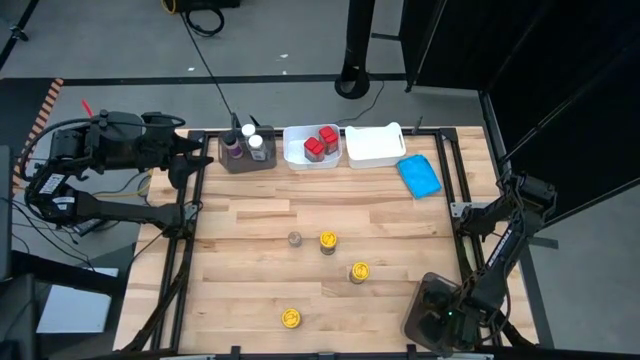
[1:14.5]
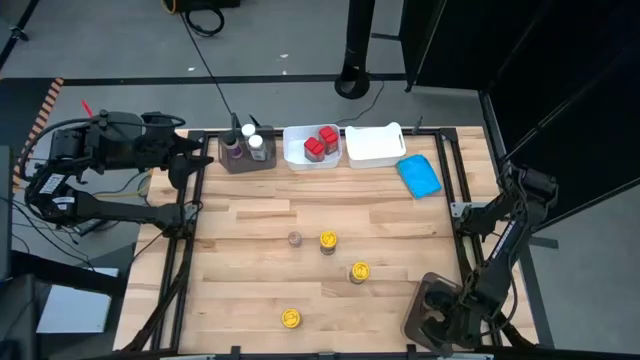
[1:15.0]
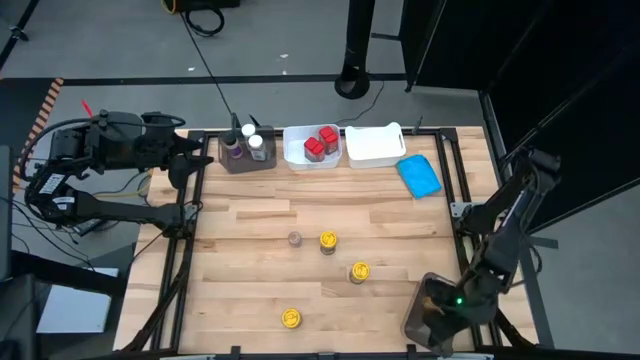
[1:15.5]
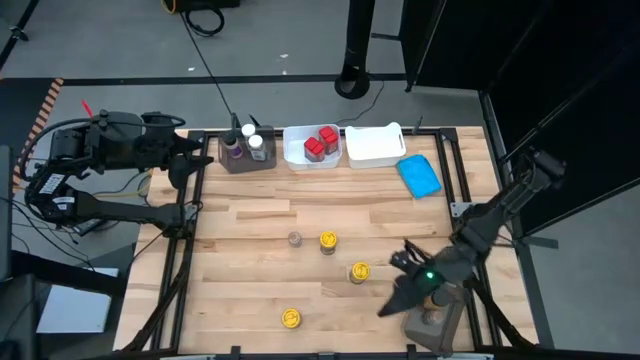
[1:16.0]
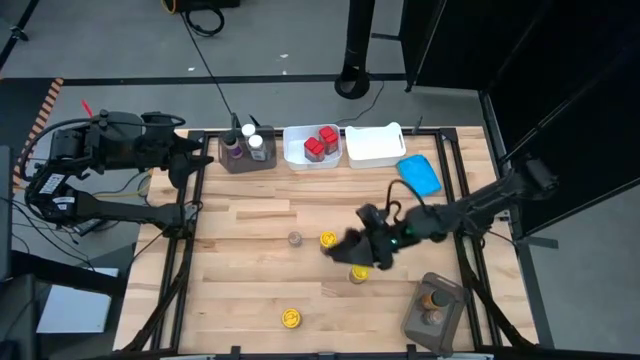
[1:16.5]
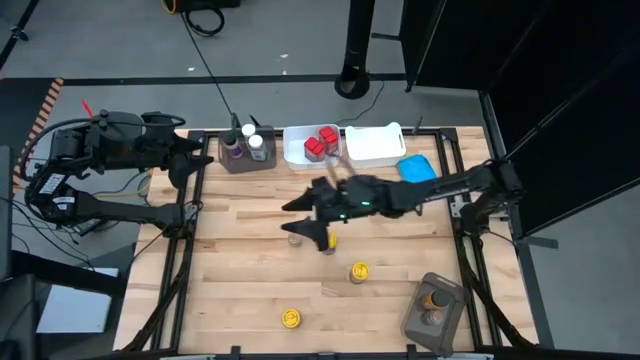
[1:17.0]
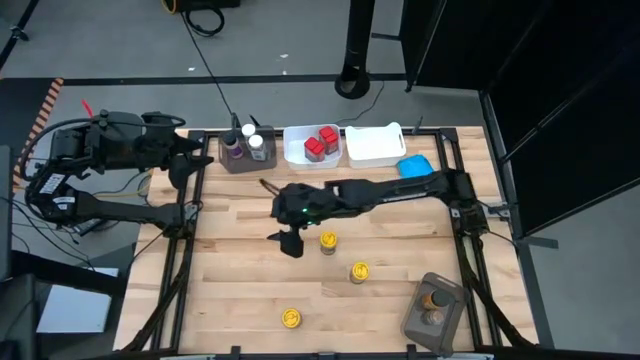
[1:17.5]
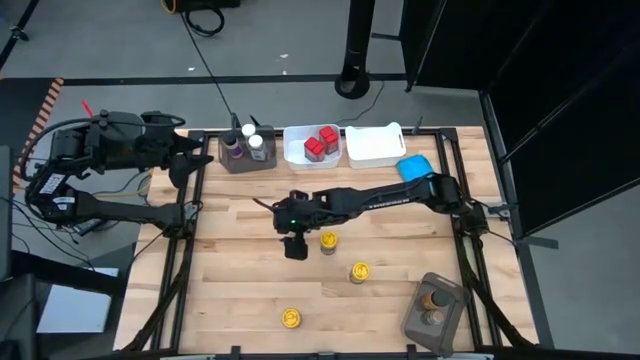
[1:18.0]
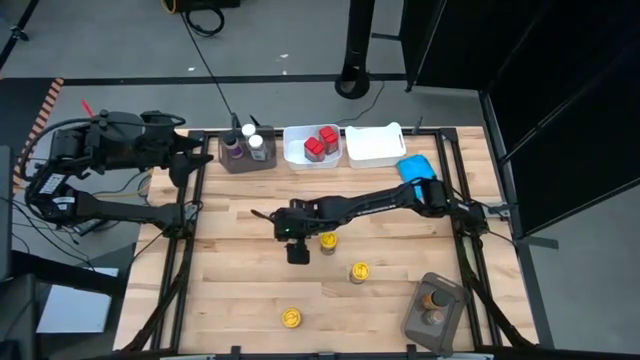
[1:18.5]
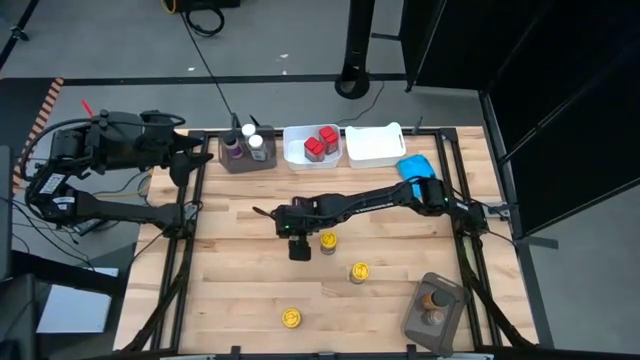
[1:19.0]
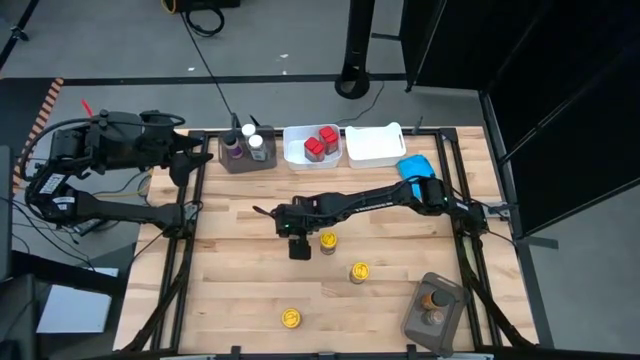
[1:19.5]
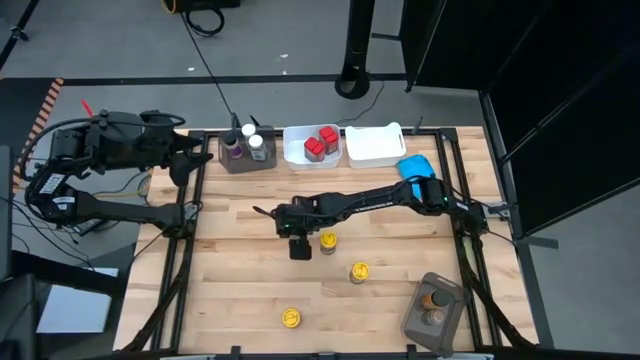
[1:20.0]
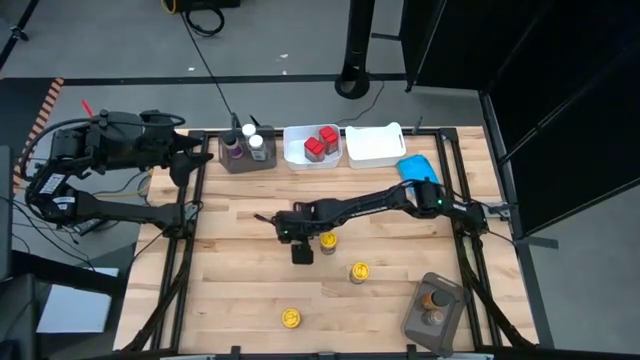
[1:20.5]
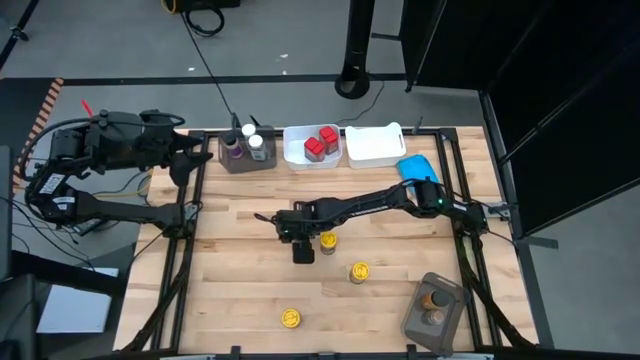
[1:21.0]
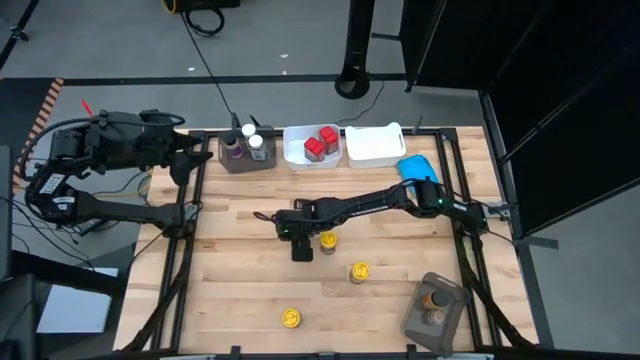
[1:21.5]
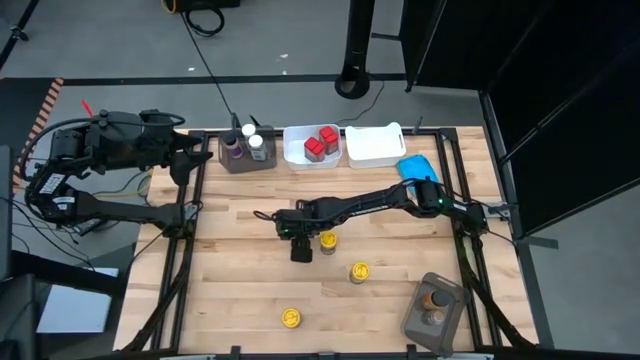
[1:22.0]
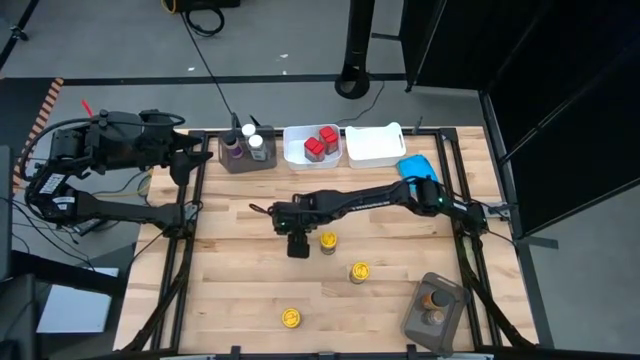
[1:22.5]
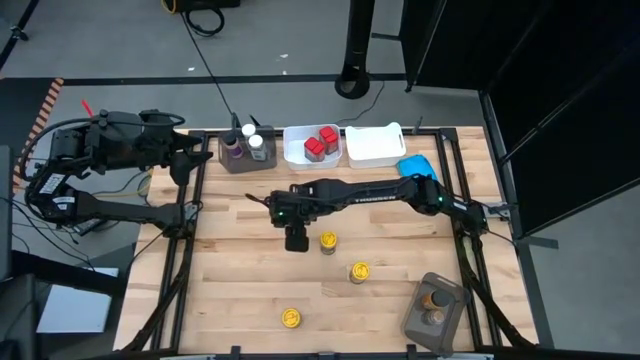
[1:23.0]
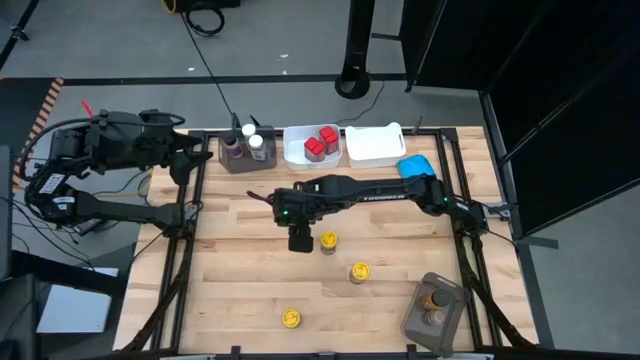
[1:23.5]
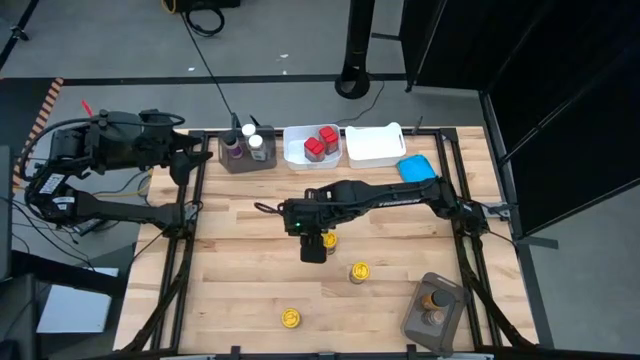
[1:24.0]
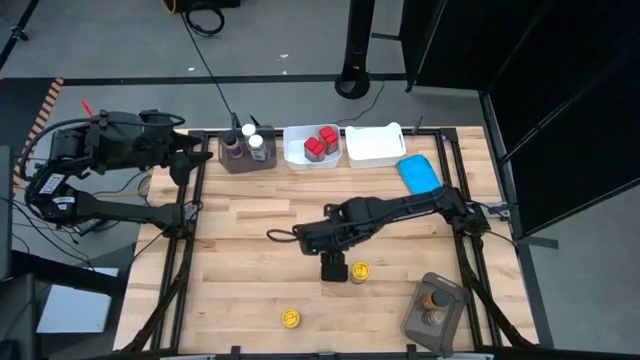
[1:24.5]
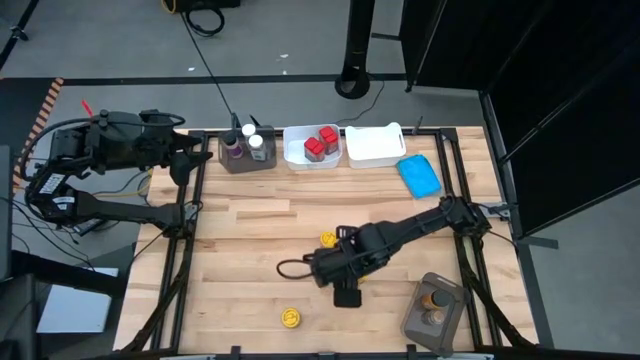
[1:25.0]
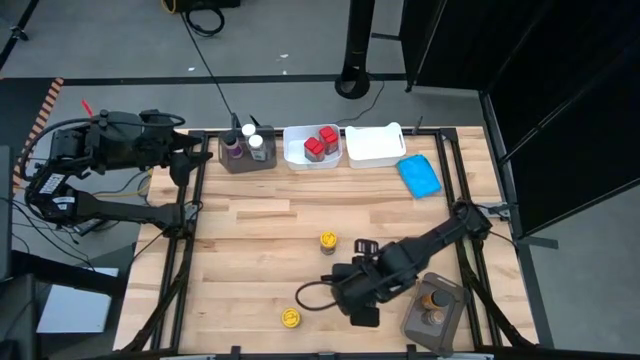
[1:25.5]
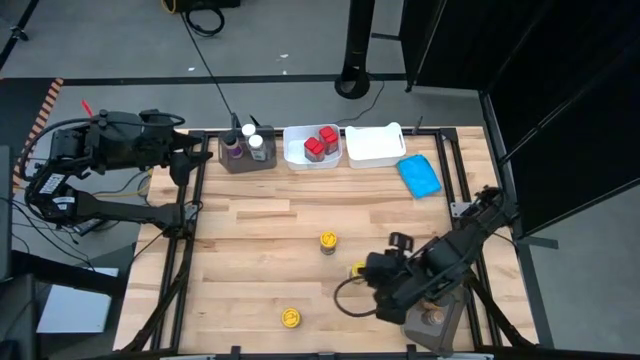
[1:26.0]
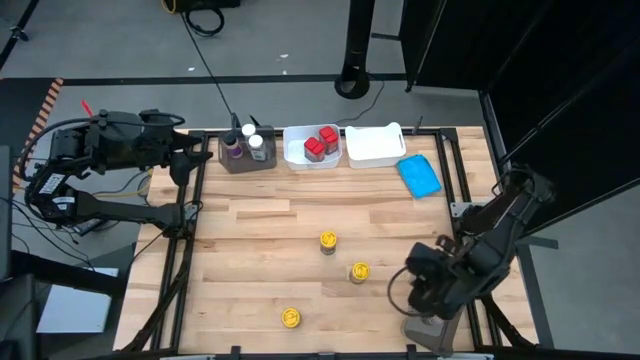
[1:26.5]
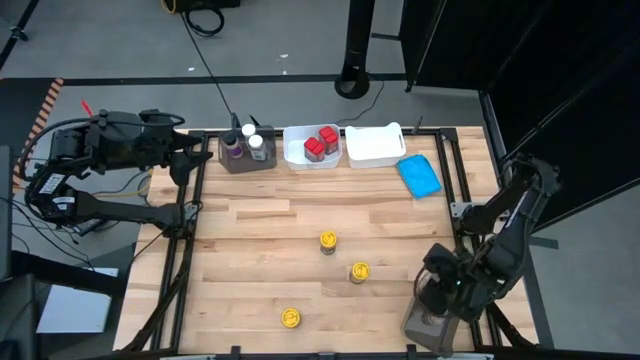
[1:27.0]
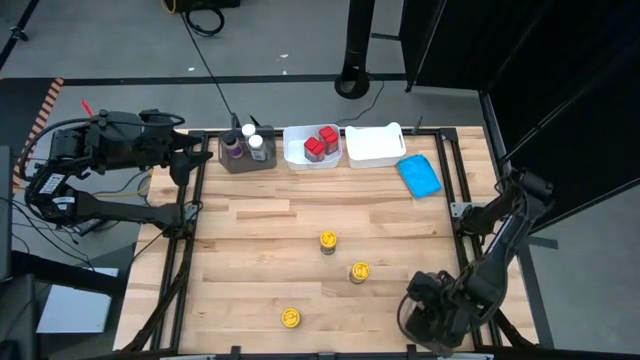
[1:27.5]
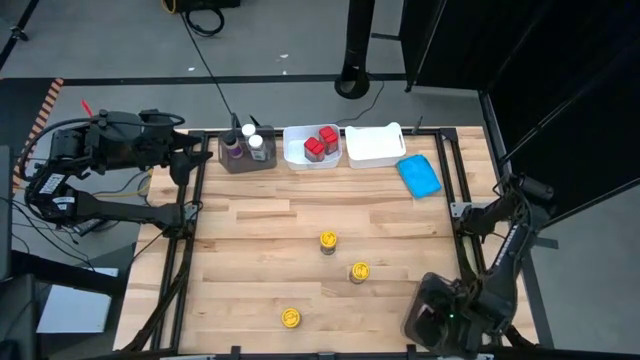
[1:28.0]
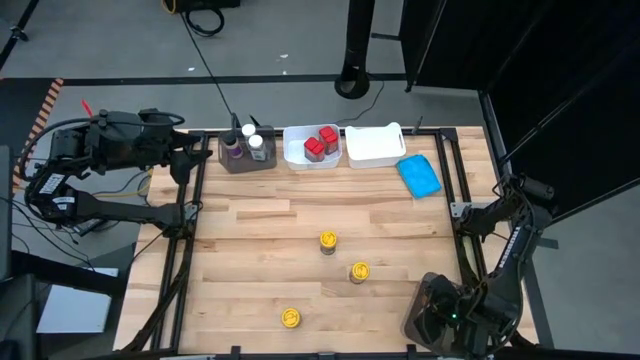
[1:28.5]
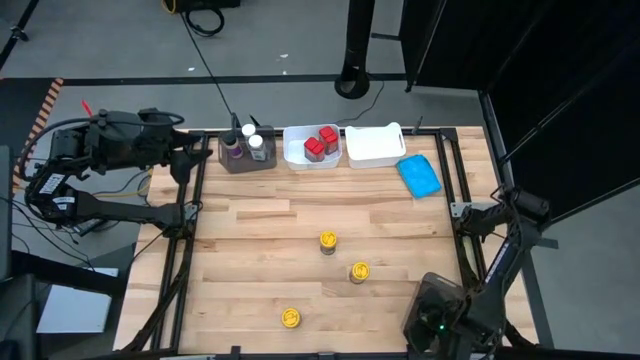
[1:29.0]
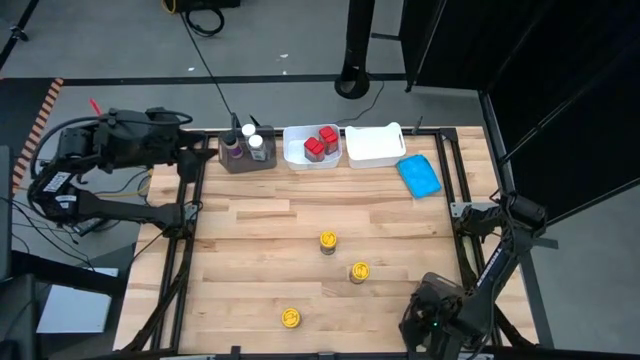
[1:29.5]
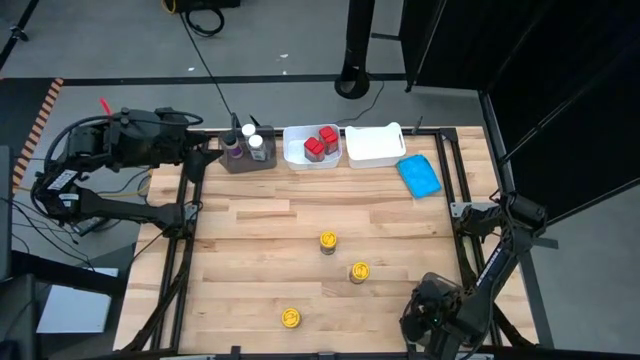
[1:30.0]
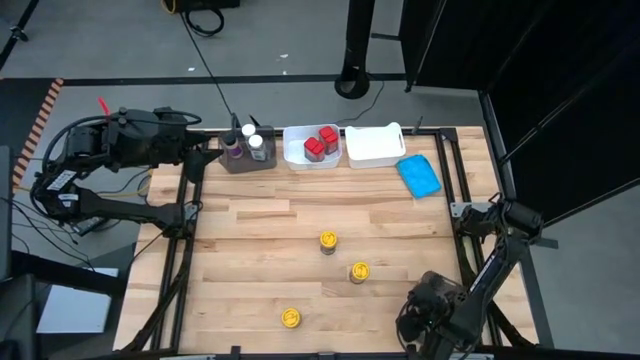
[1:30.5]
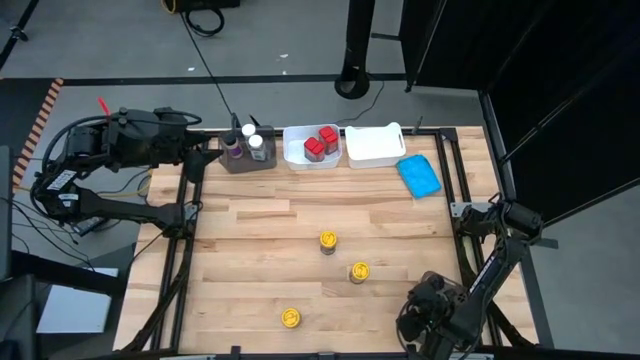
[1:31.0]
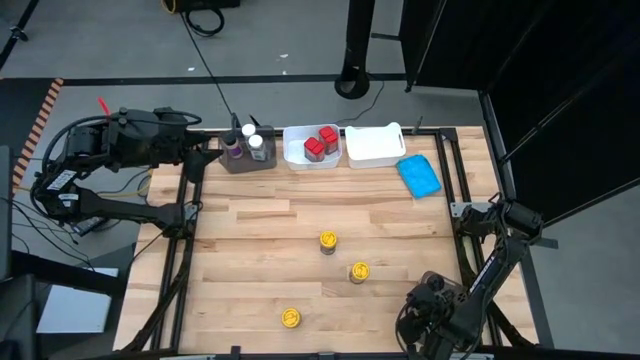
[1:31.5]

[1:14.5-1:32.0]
Task: Sort spices by type
Put the brown seasoning bottle into the top black bin

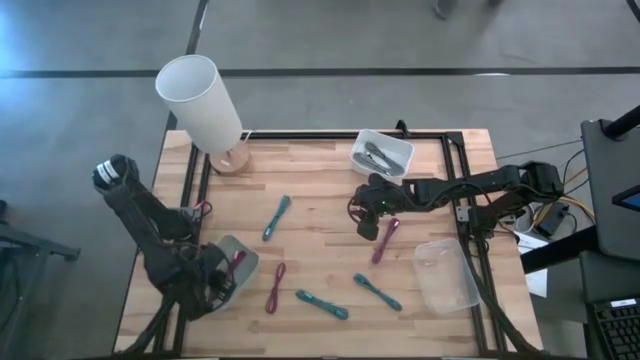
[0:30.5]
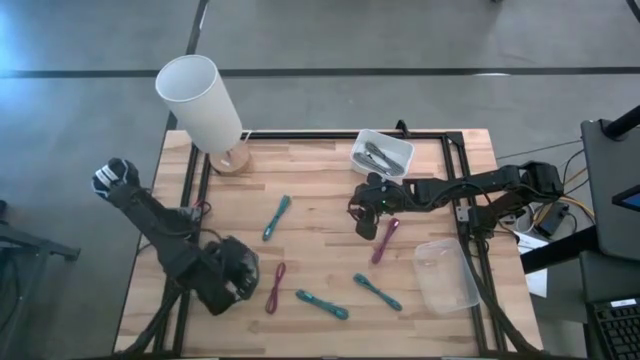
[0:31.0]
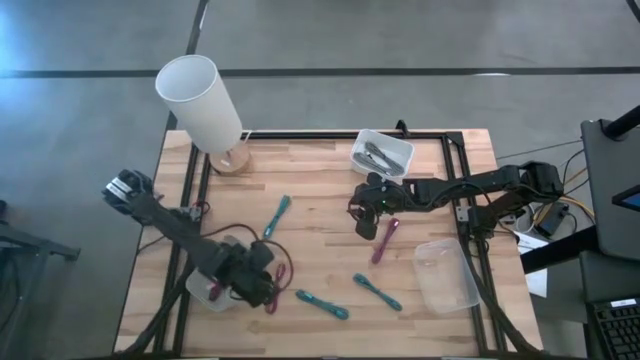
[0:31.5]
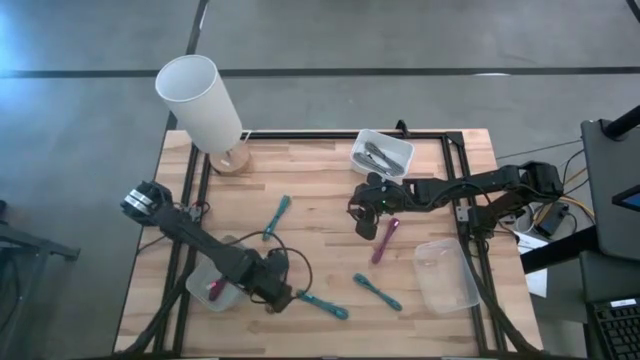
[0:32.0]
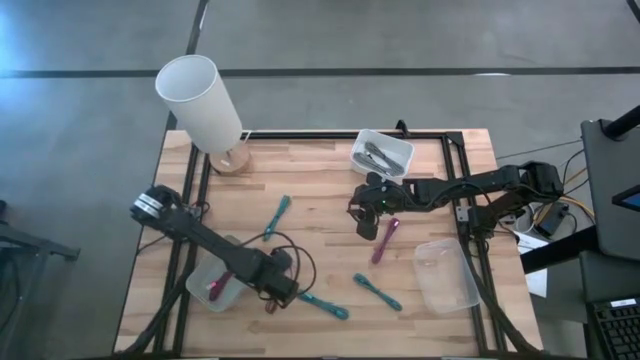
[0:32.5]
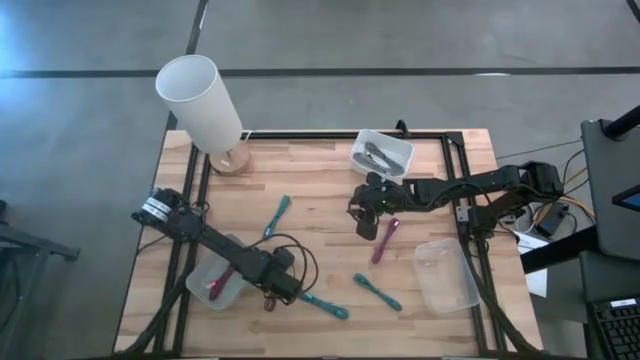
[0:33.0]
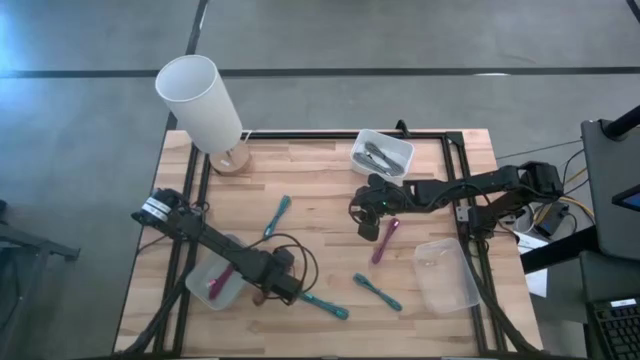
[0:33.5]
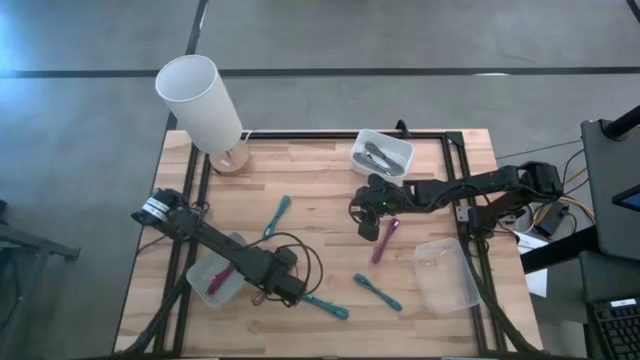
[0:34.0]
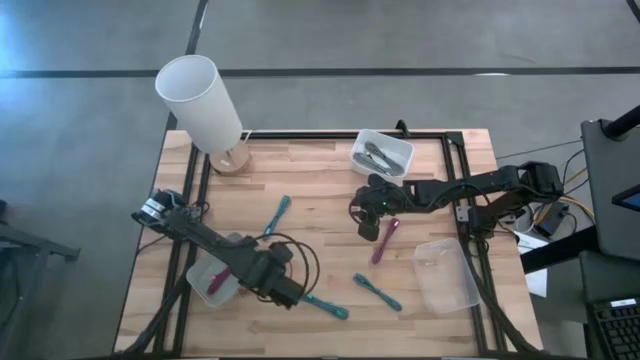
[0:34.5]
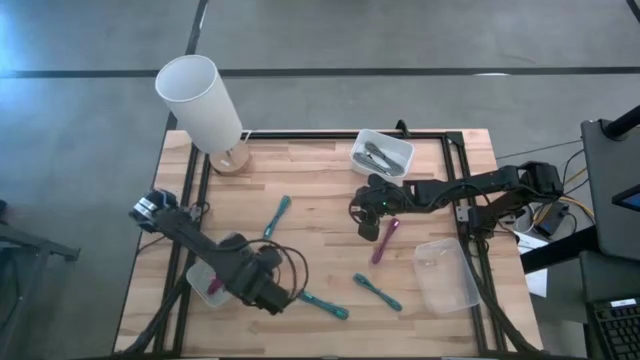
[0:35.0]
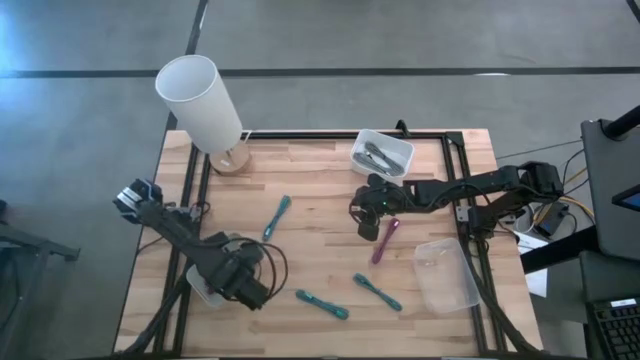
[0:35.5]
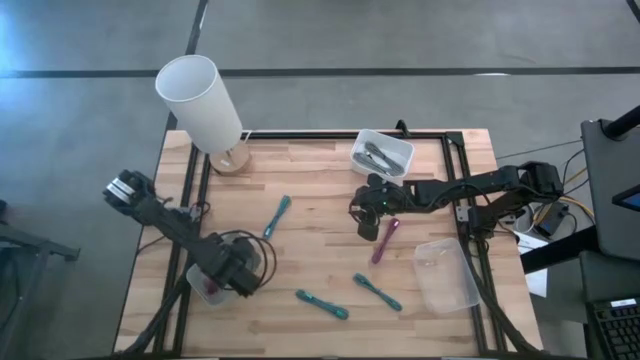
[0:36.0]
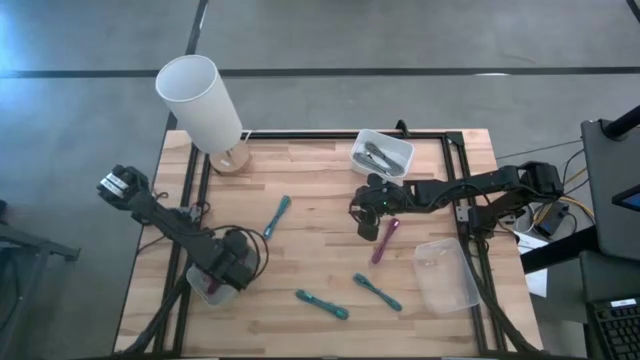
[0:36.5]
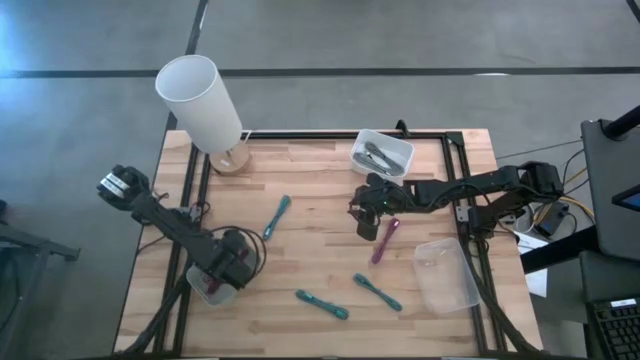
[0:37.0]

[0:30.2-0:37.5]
Task: Pick & Place USB Port
Put the left red patterned charger cable into the gray bin
